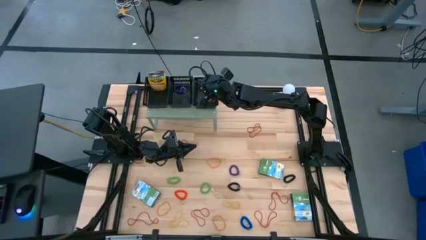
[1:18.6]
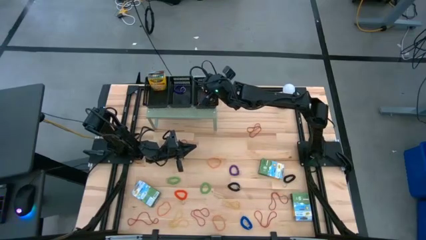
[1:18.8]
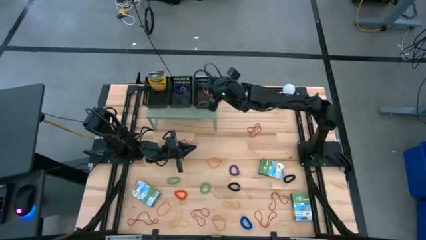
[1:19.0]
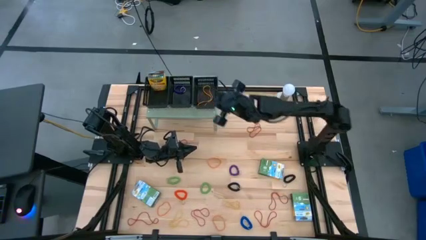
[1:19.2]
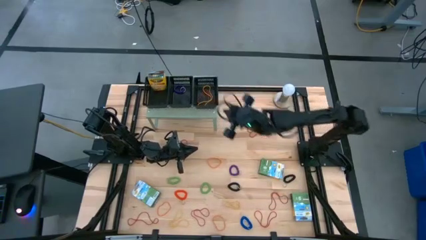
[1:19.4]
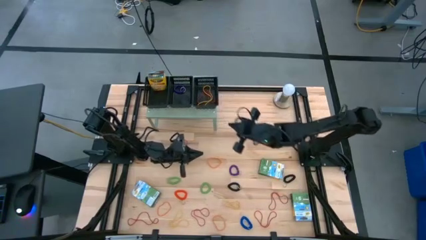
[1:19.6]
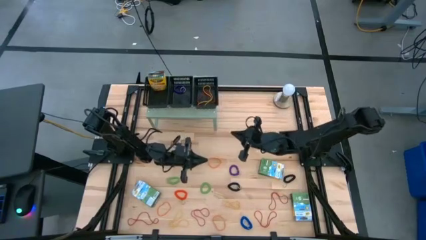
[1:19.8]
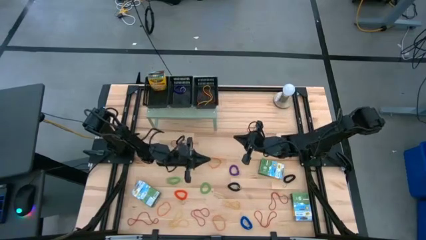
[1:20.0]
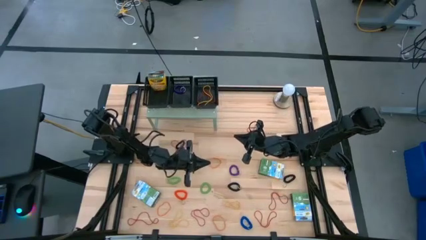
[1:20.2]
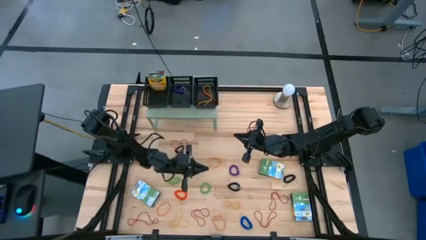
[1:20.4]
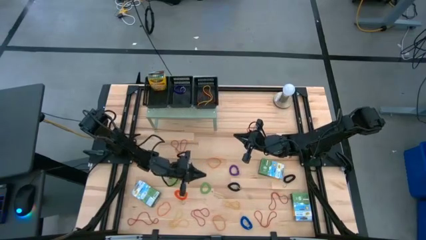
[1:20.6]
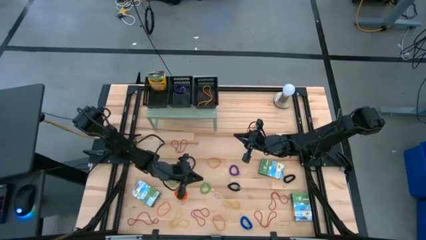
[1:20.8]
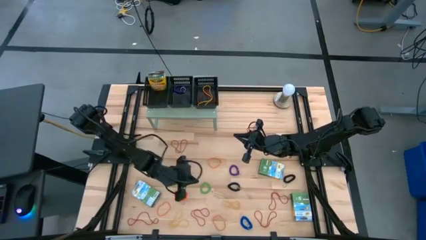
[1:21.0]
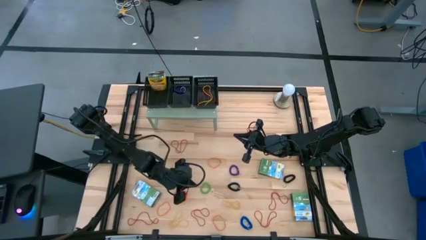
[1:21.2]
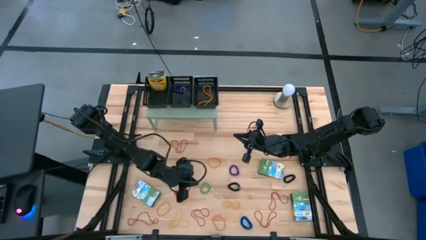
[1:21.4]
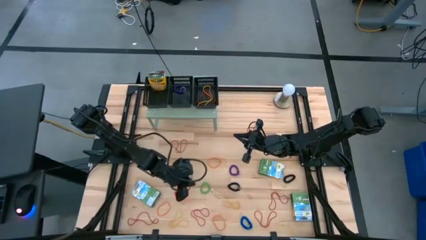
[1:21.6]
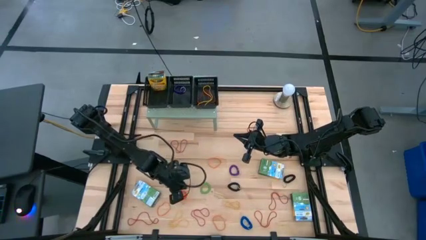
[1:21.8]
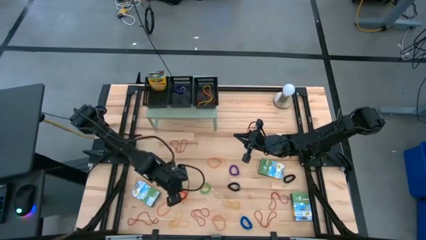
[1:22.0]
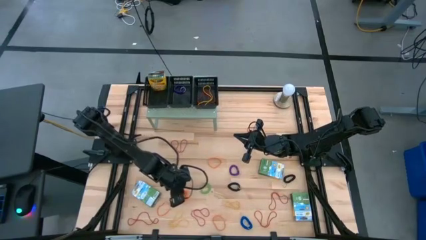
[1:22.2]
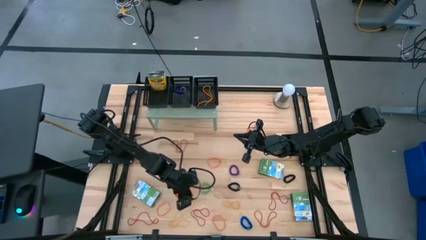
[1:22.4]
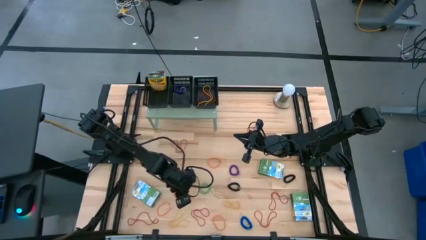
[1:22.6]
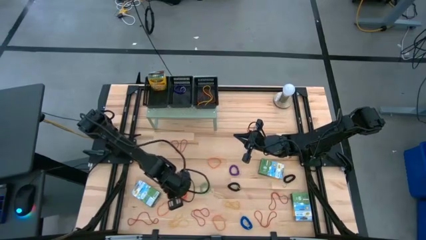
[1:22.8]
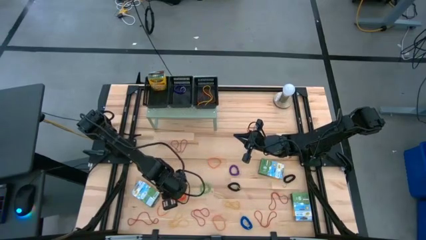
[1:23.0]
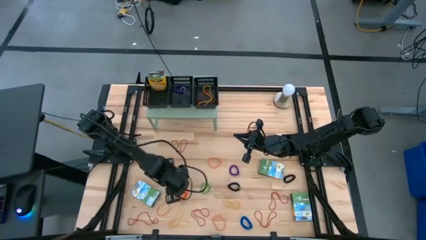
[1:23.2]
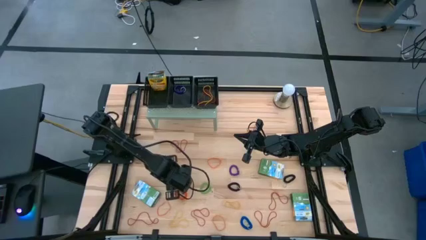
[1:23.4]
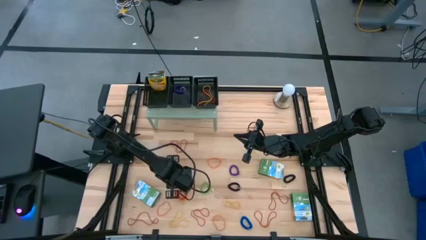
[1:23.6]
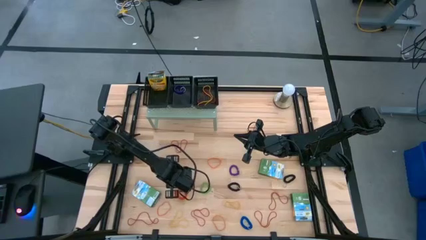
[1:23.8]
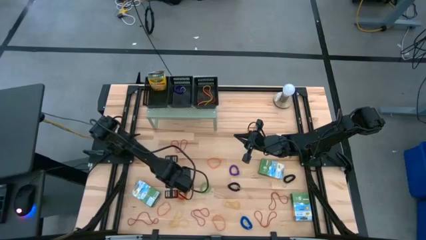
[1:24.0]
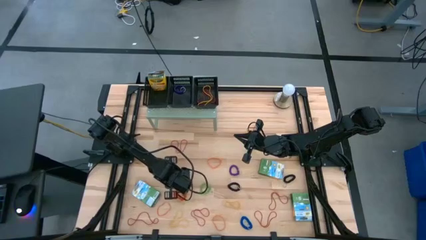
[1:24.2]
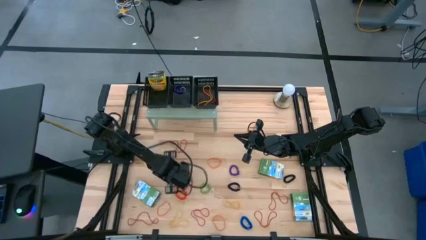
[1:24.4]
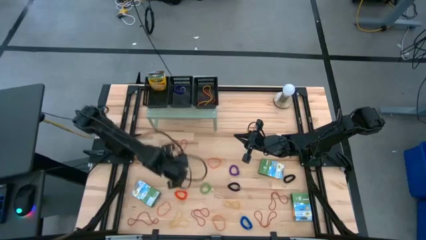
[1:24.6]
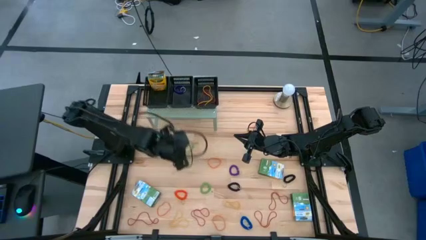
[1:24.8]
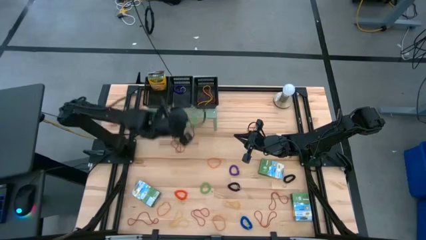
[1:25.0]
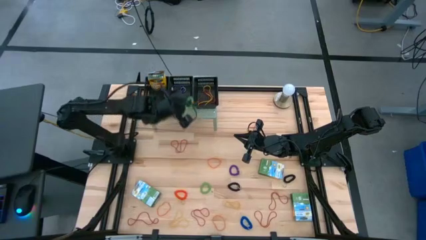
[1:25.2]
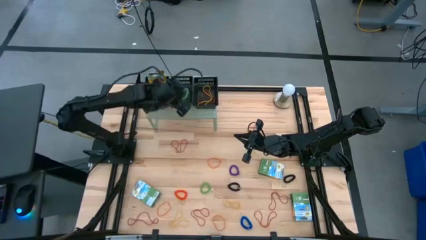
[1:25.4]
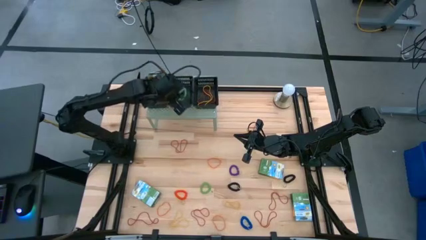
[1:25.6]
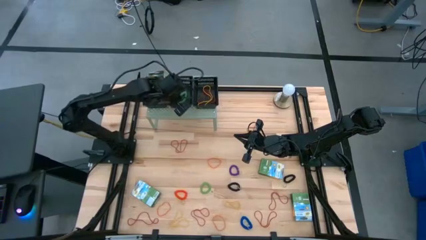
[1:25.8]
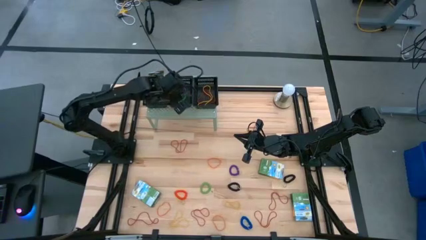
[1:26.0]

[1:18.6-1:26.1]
Task: Pick & Place Office Desk Supplies
Put the green spring keychain into the middle black bin on the shelf

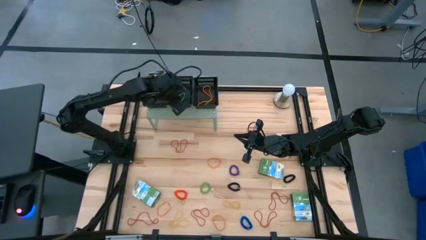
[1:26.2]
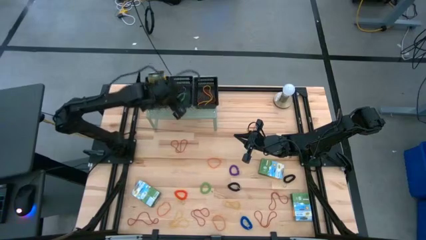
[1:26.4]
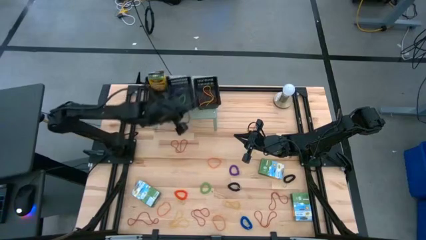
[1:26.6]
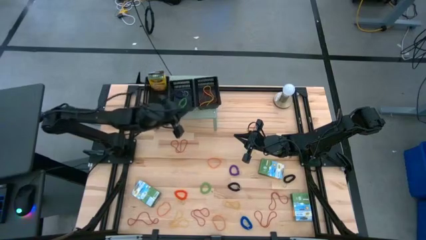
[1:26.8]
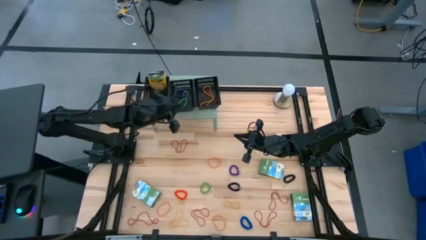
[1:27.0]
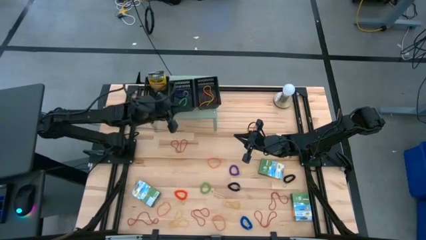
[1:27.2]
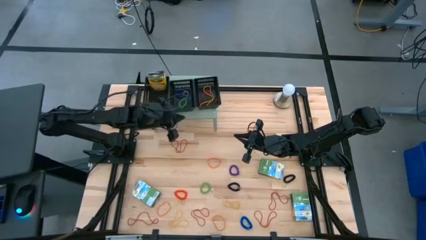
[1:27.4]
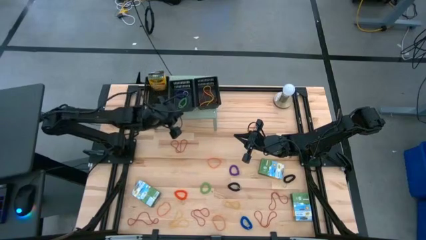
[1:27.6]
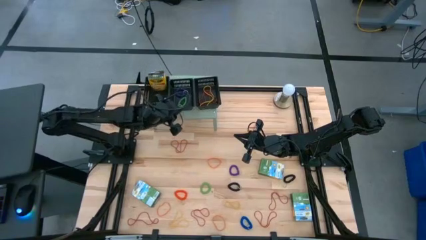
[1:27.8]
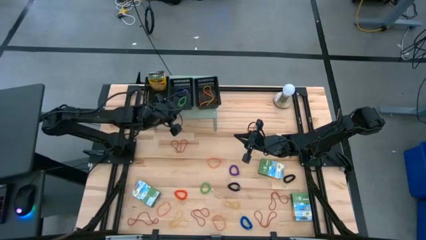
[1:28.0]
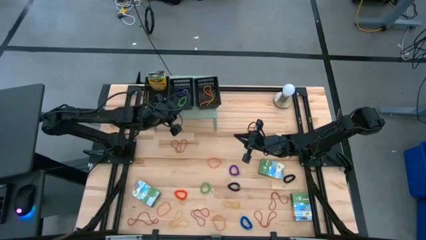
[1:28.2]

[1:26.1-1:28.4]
Adjust the middle black bin

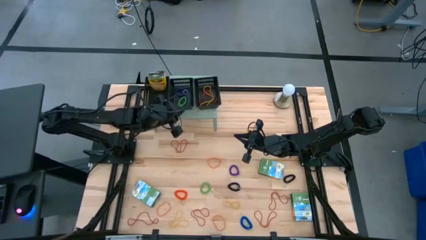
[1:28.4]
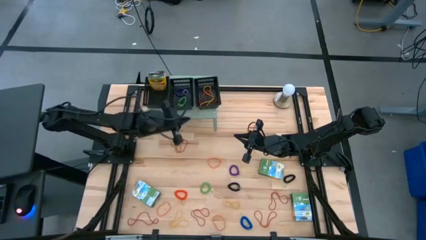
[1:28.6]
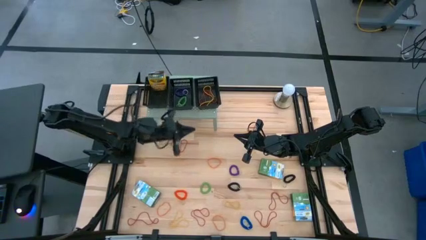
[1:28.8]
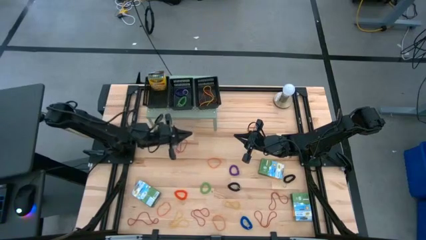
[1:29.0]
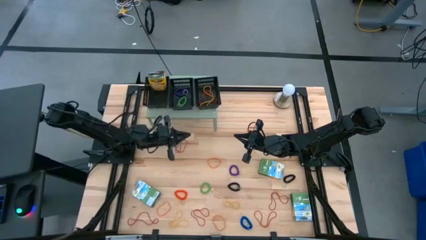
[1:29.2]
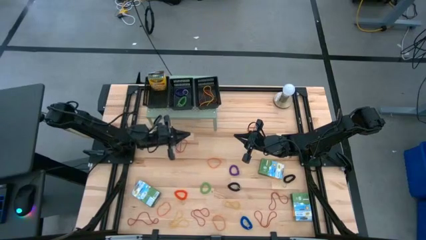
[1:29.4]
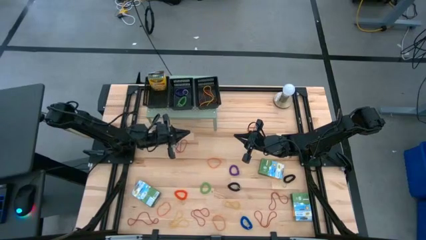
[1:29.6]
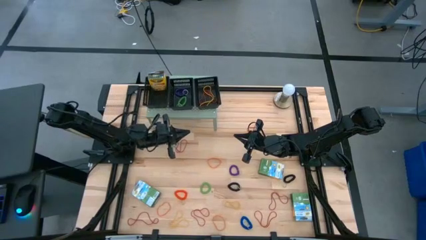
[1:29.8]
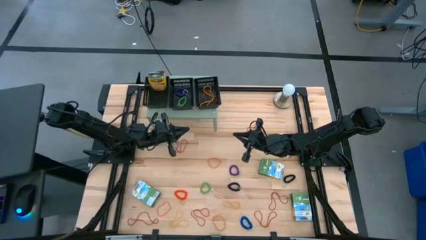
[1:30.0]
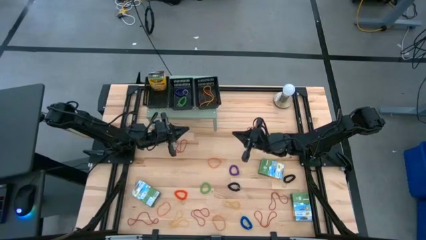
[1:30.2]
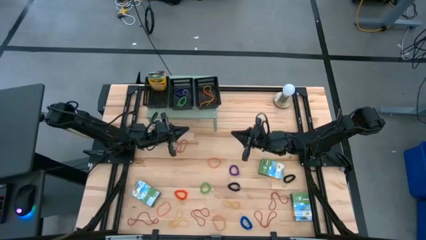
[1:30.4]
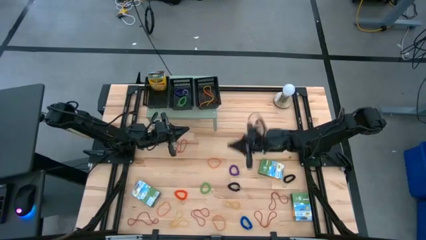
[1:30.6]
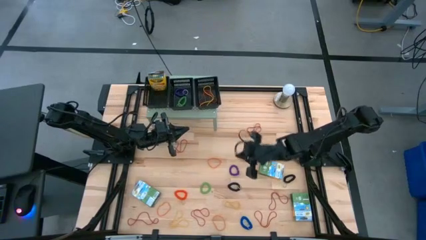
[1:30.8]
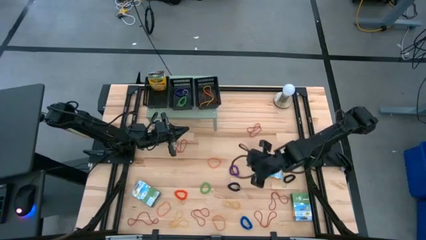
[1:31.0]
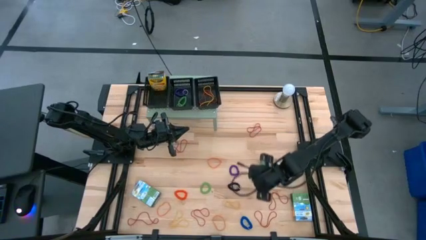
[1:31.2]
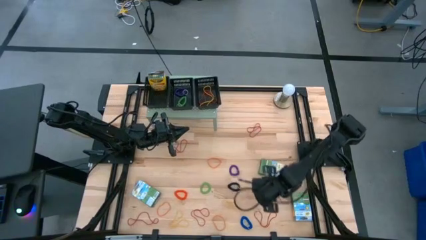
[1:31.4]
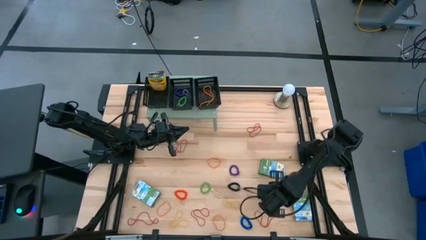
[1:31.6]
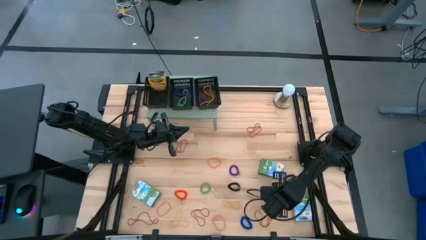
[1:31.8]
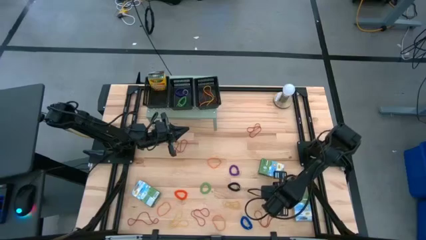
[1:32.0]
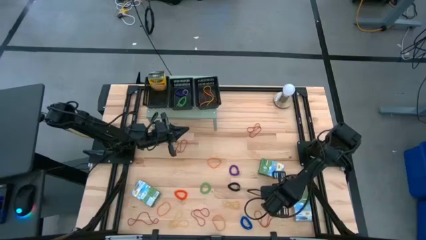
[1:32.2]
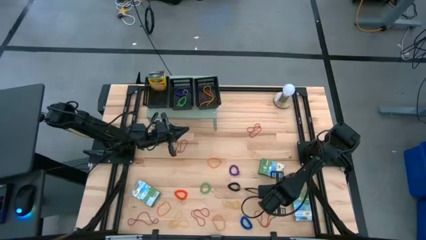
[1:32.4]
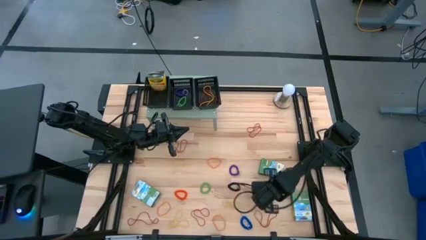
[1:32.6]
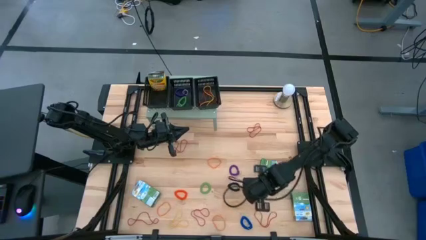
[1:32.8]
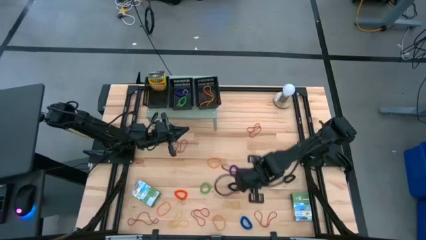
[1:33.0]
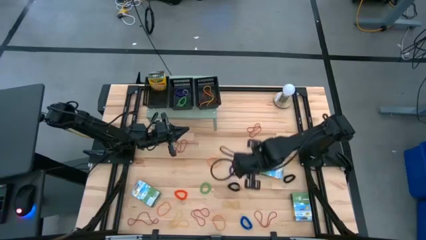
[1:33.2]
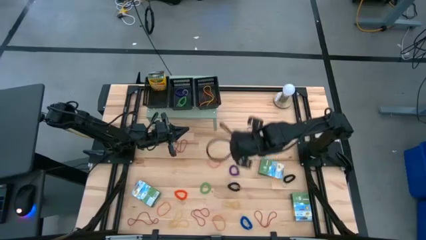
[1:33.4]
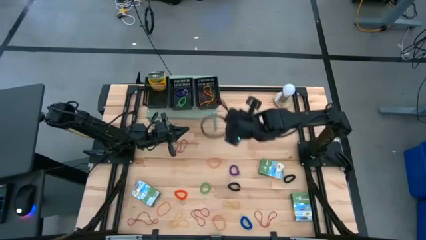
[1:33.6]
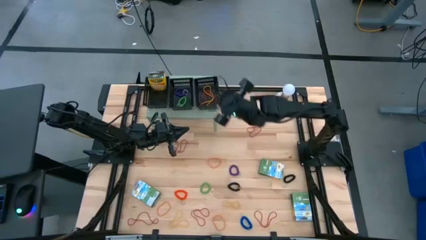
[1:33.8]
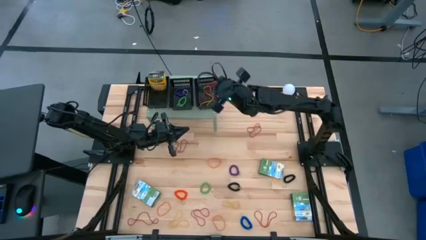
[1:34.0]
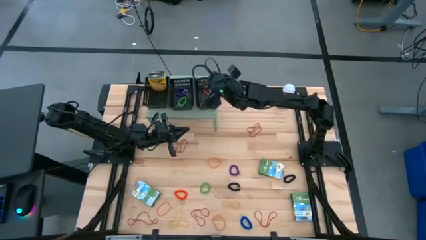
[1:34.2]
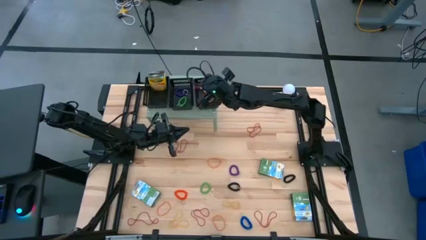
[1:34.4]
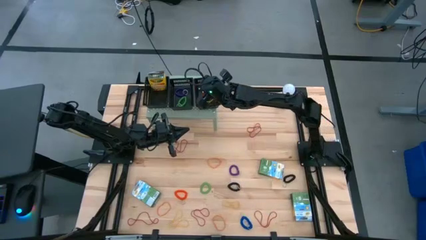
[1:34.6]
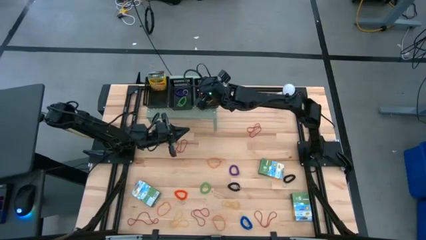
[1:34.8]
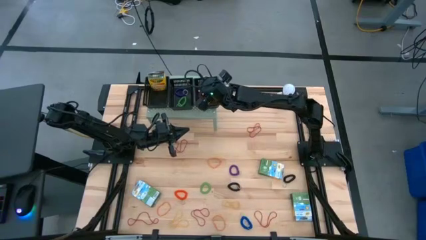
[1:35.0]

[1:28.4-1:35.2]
Put the red rubber band into the right black bin
